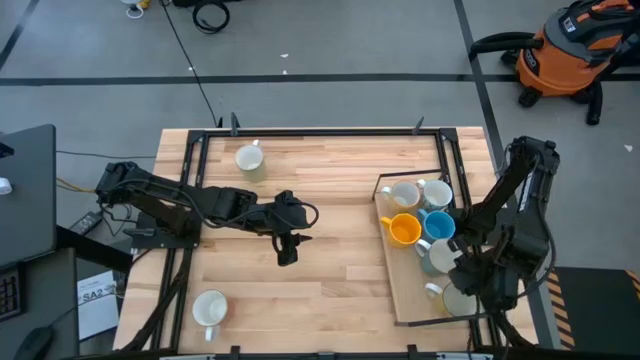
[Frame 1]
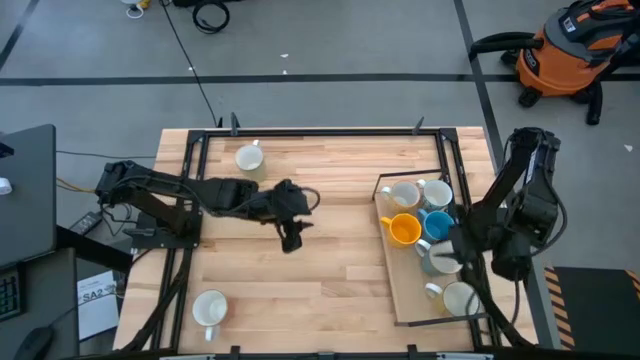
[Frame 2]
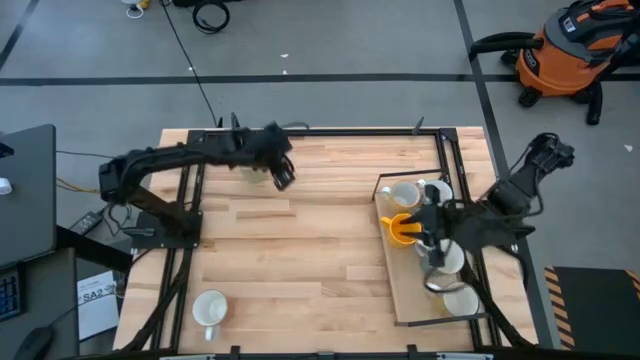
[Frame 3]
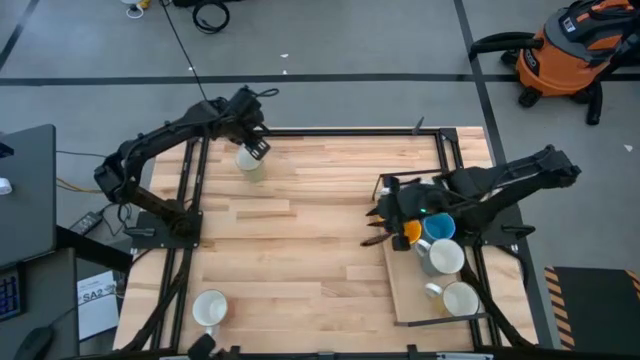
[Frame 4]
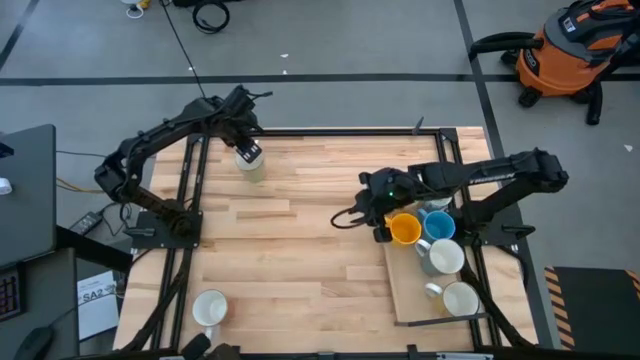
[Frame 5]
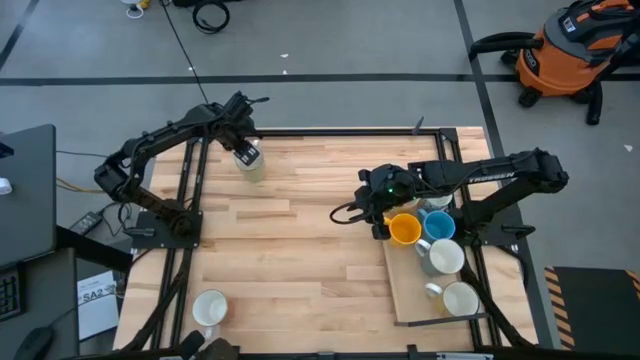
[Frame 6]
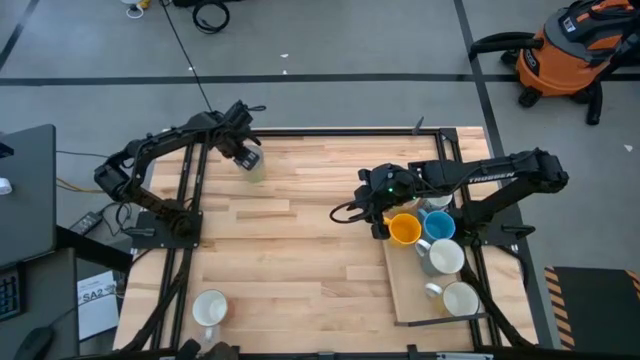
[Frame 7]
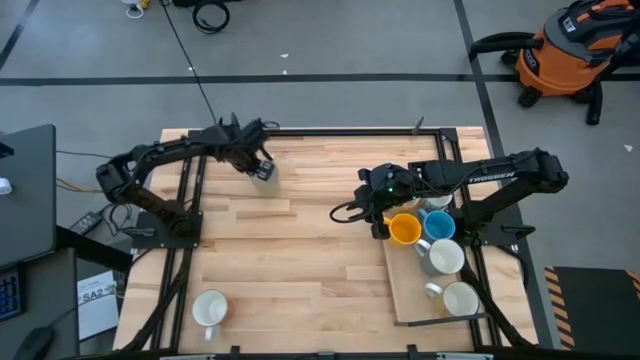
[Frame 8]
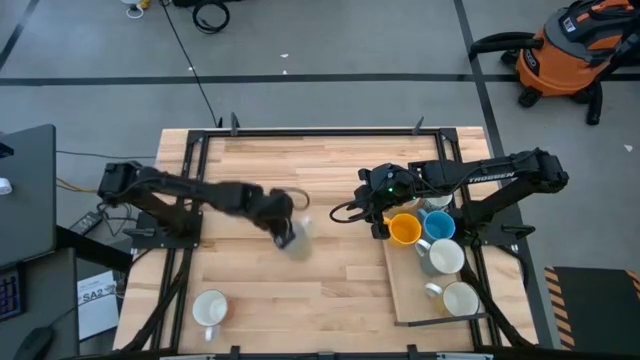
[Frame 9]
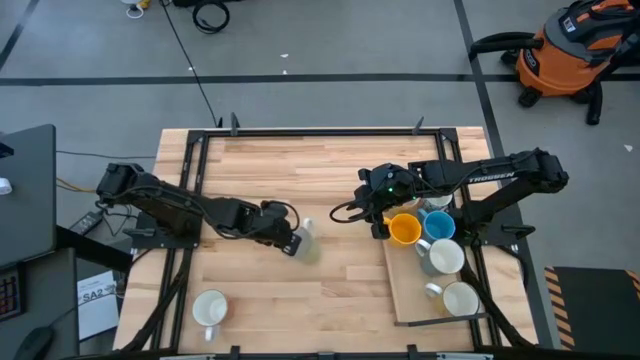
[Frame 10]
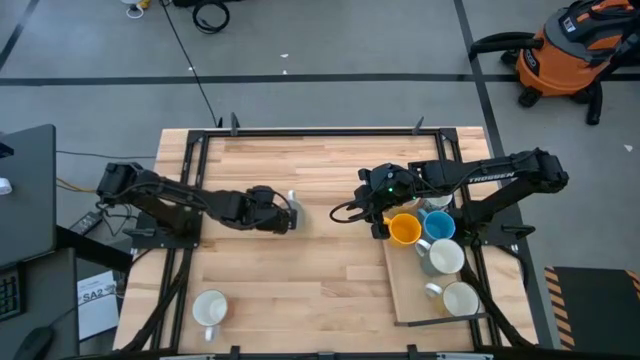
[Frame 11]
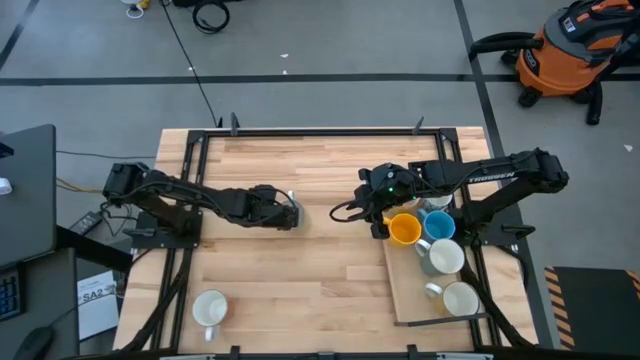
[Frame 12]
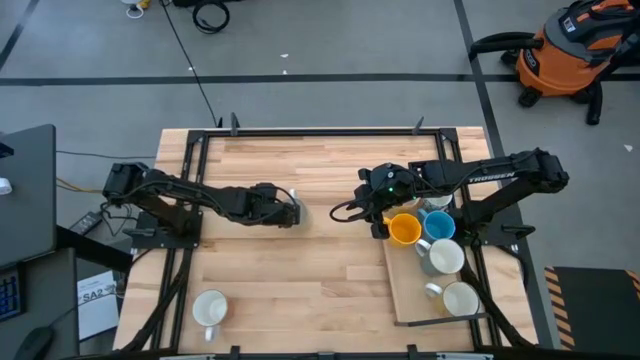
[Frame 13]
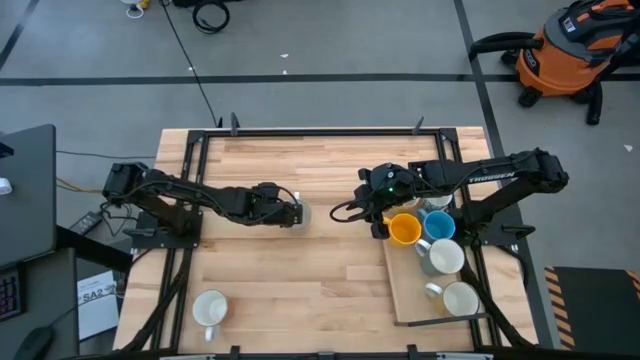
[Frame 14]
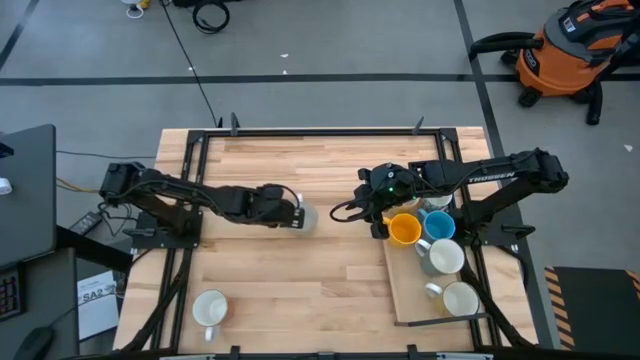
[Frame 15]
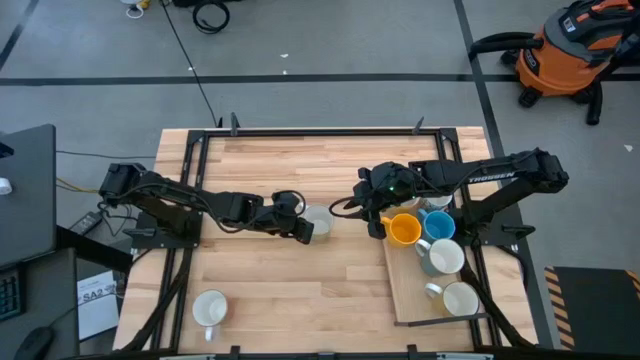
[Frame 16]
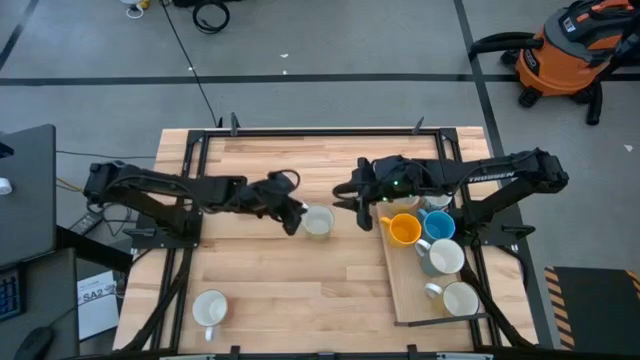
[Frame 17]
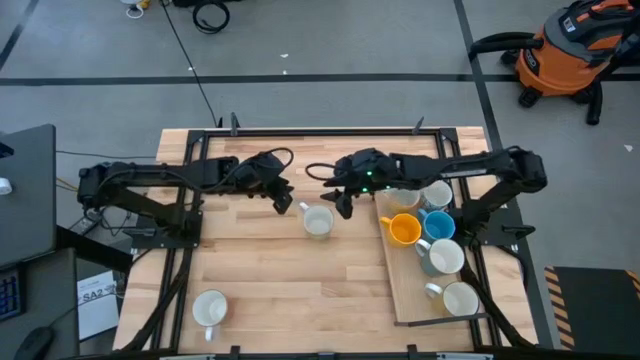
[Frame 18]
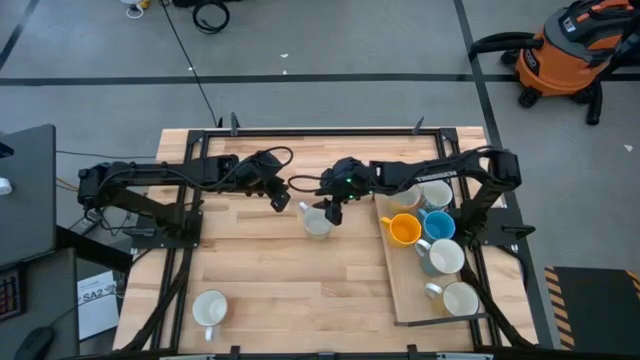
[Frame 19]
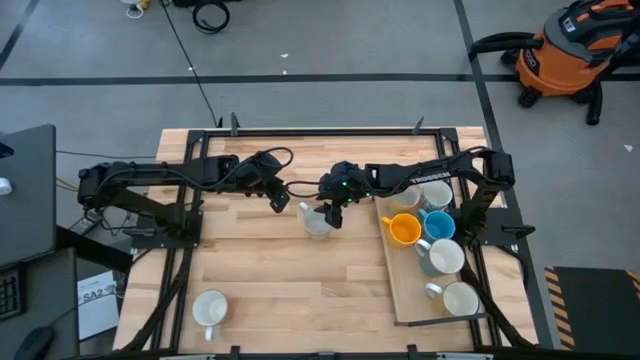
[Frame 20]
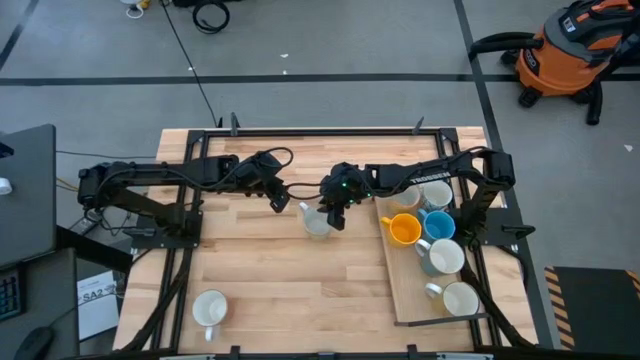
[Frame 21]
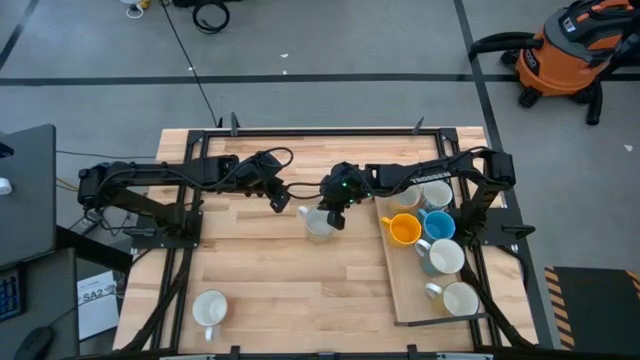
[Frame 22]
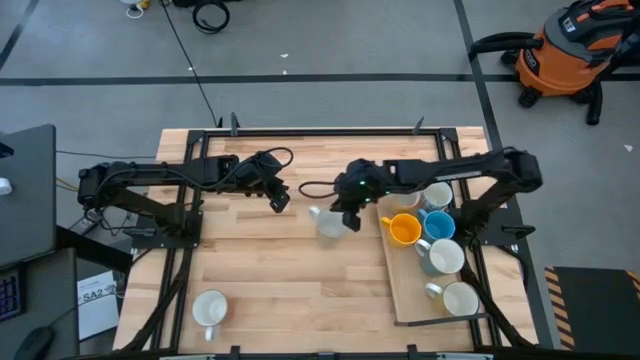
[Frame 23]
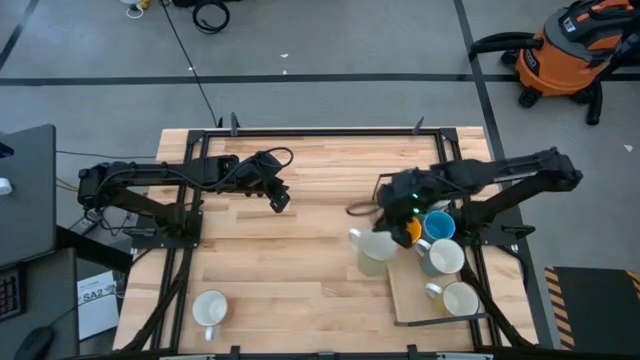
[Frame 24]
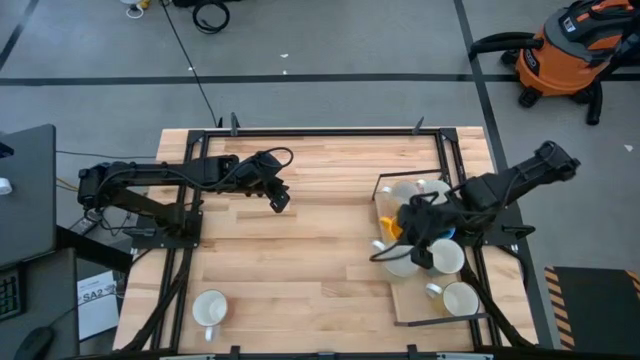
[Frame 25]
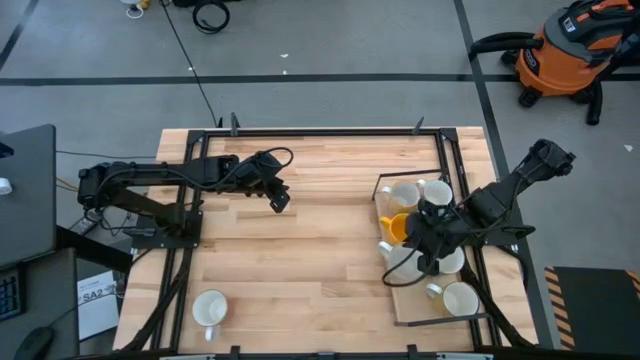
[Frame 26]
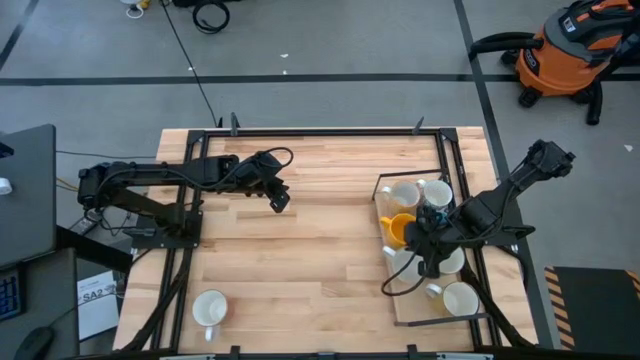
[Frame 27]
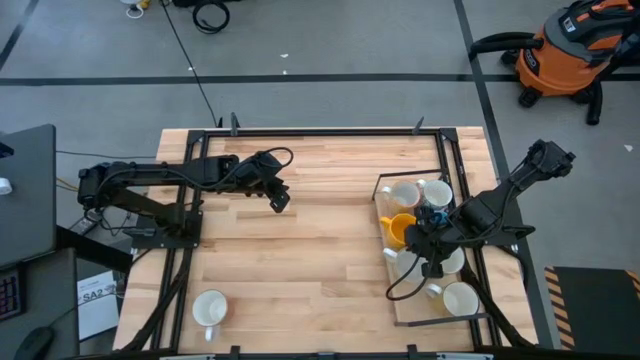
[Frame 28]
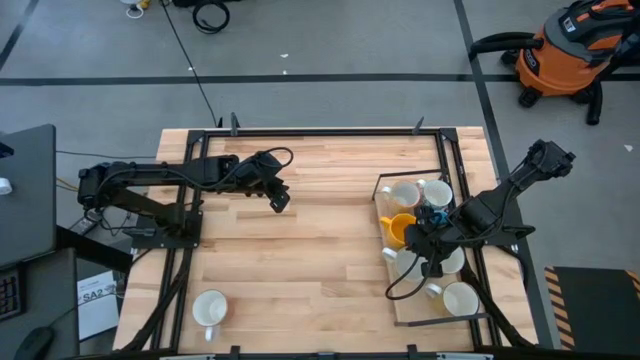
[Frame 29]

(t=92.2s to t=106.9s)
Task: Place coffee mugs
Put the green mug on the shelf
